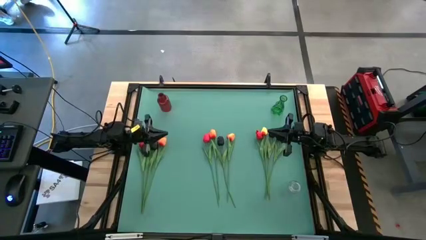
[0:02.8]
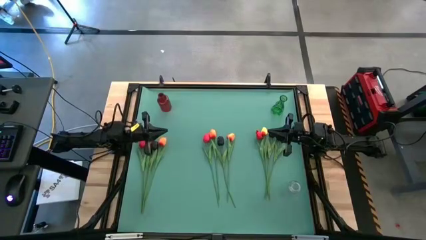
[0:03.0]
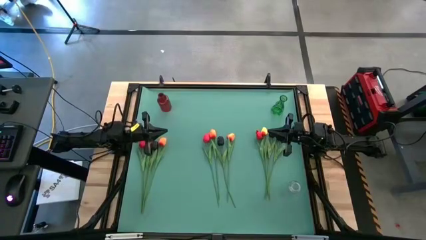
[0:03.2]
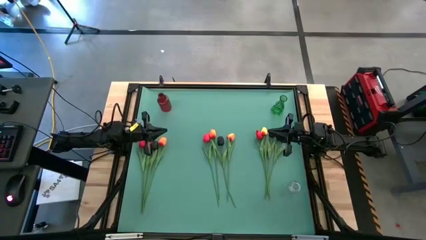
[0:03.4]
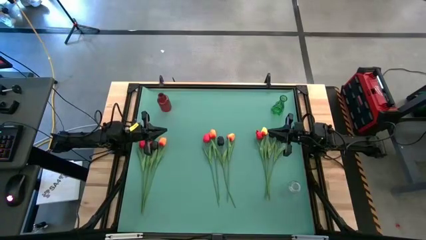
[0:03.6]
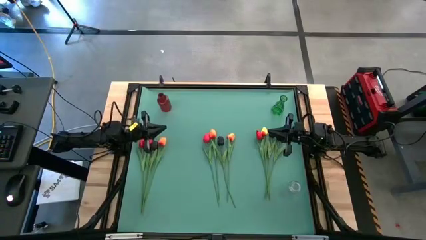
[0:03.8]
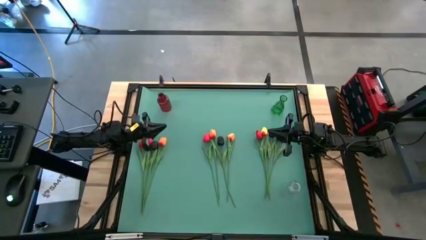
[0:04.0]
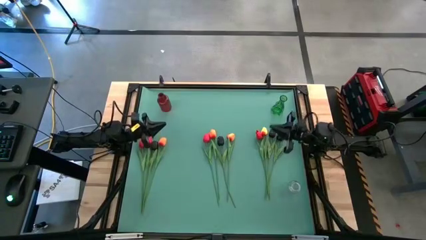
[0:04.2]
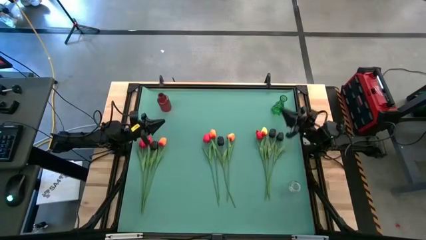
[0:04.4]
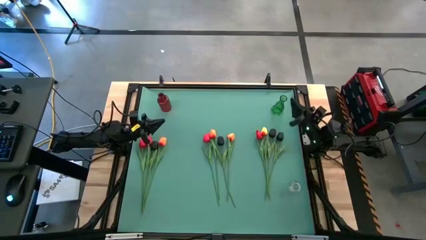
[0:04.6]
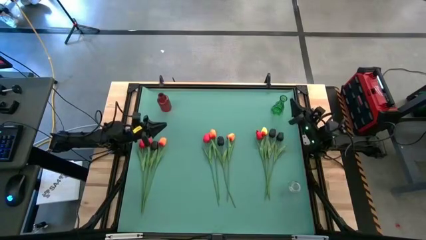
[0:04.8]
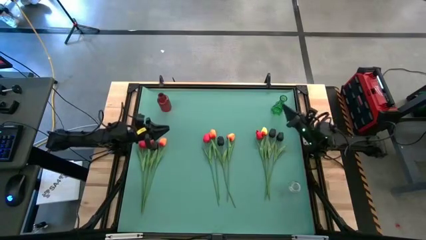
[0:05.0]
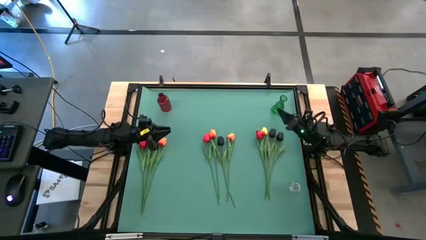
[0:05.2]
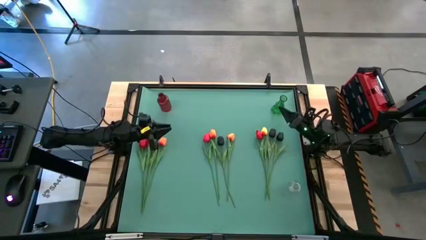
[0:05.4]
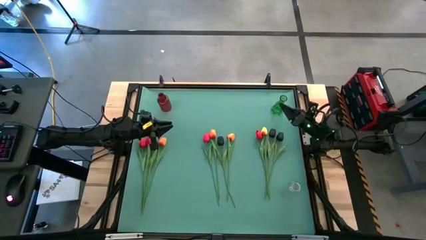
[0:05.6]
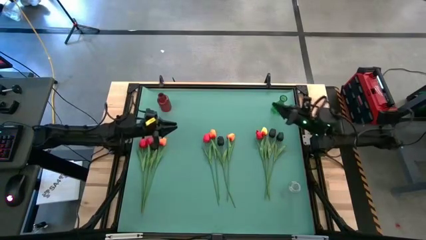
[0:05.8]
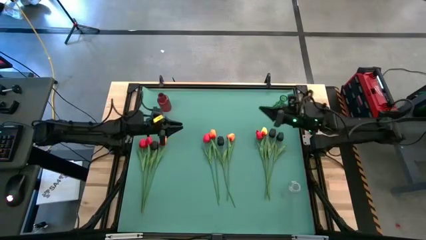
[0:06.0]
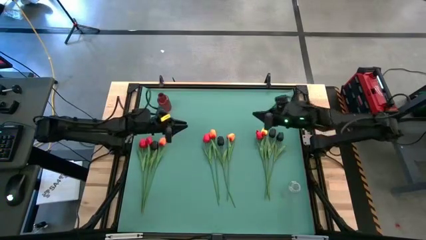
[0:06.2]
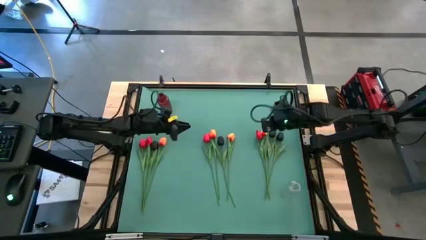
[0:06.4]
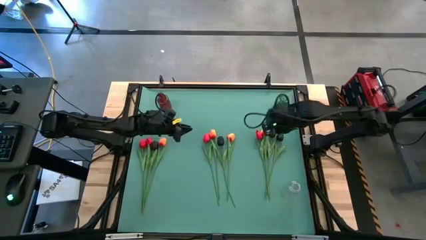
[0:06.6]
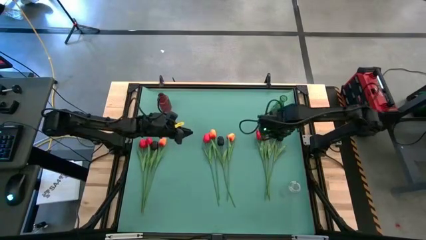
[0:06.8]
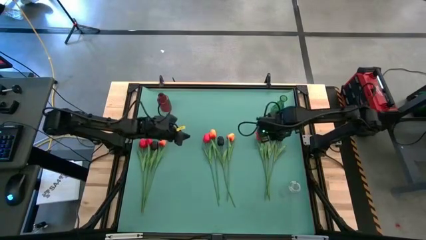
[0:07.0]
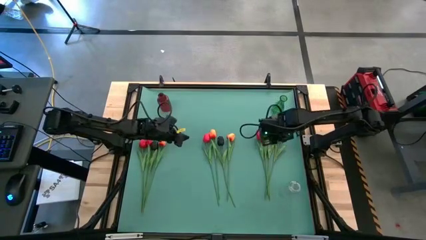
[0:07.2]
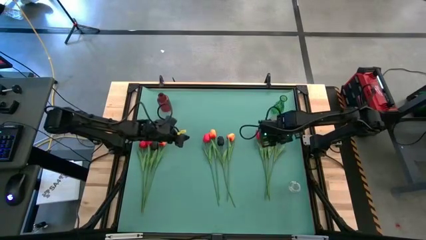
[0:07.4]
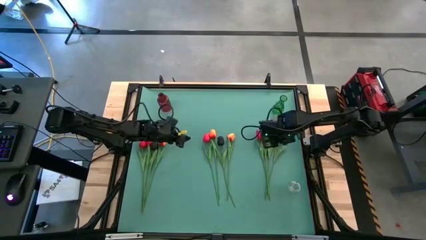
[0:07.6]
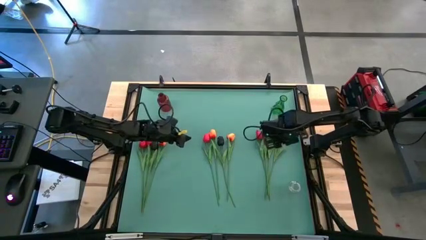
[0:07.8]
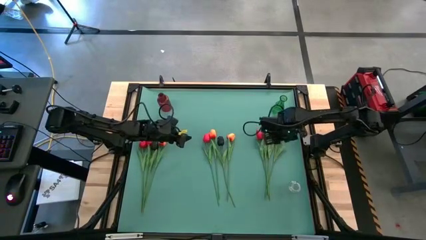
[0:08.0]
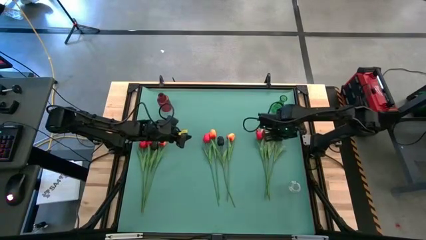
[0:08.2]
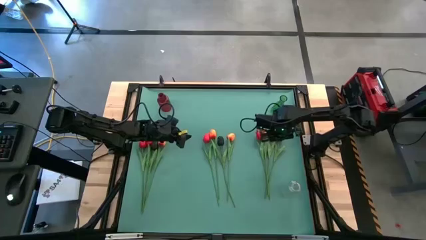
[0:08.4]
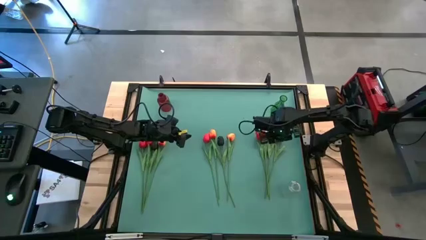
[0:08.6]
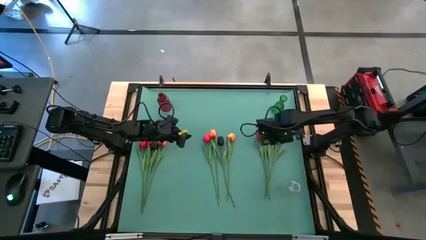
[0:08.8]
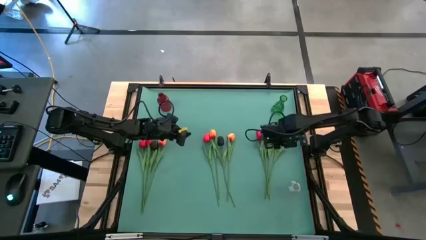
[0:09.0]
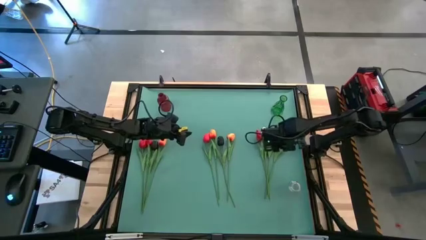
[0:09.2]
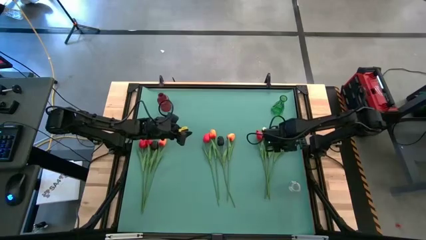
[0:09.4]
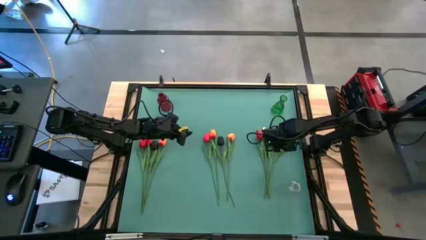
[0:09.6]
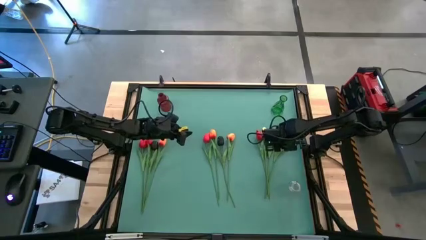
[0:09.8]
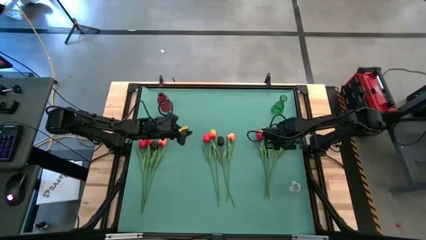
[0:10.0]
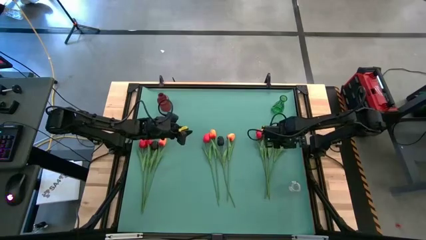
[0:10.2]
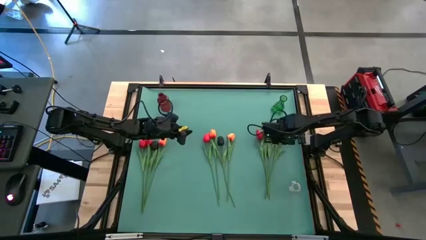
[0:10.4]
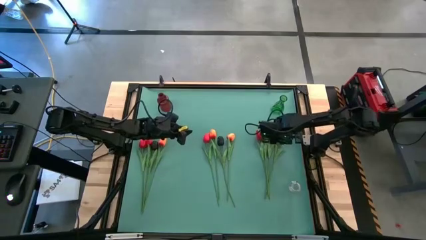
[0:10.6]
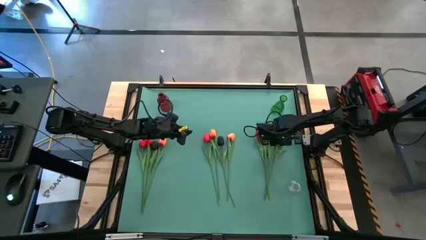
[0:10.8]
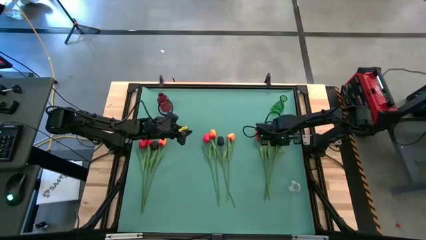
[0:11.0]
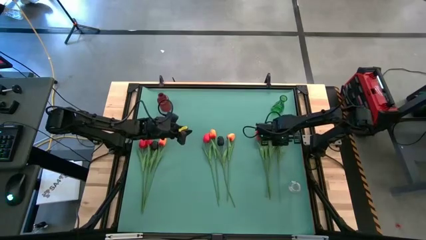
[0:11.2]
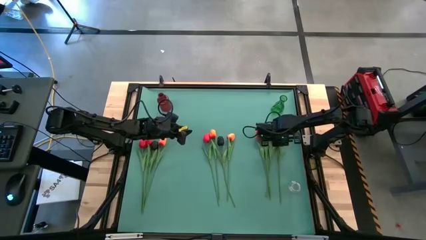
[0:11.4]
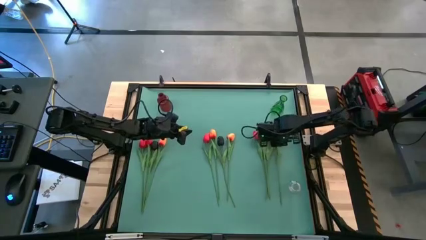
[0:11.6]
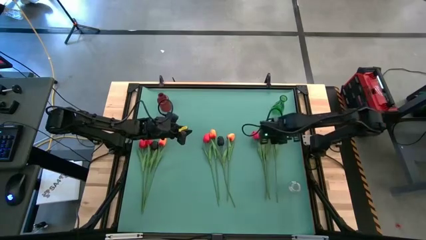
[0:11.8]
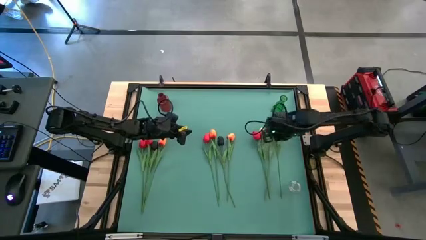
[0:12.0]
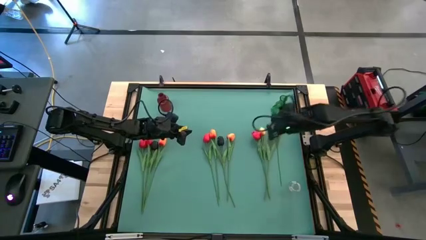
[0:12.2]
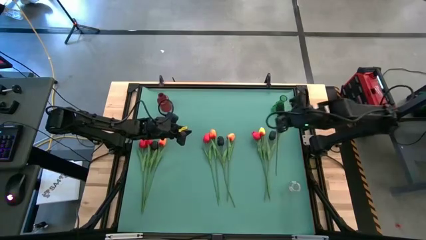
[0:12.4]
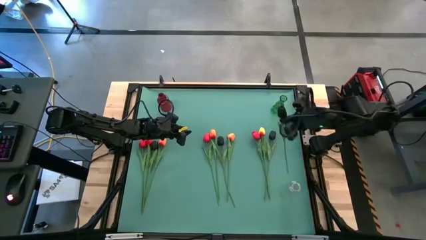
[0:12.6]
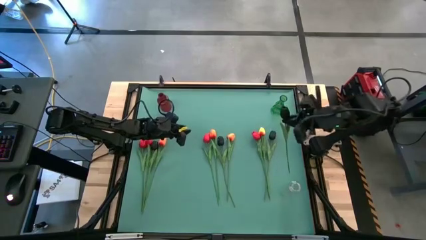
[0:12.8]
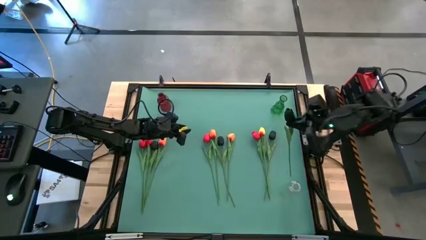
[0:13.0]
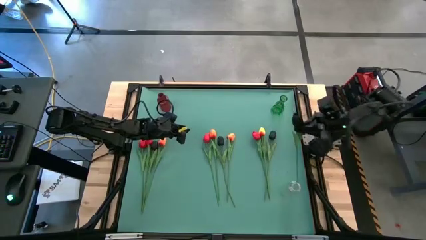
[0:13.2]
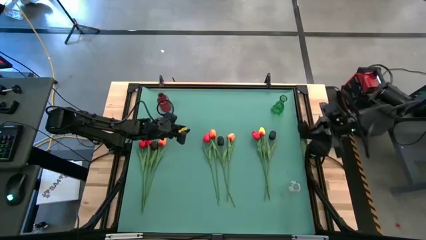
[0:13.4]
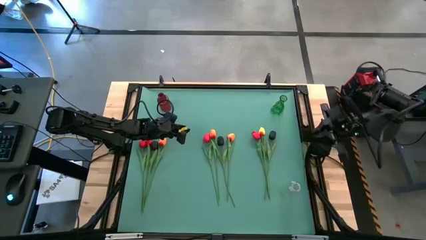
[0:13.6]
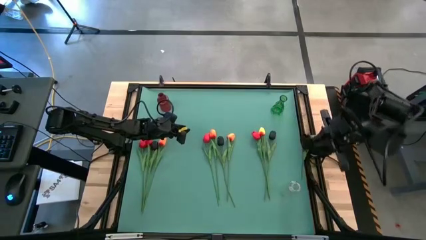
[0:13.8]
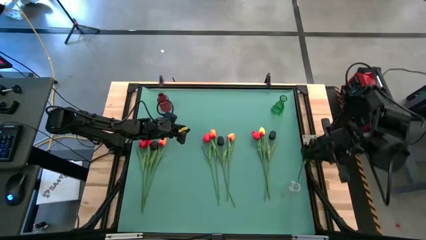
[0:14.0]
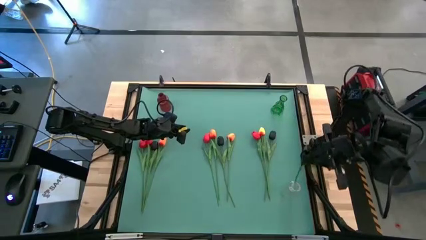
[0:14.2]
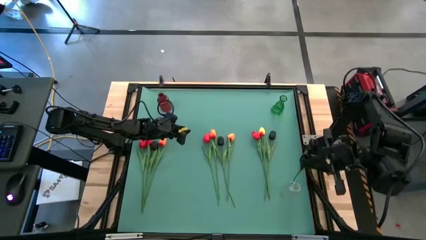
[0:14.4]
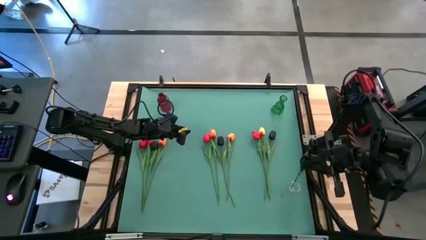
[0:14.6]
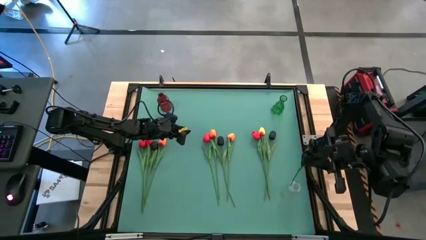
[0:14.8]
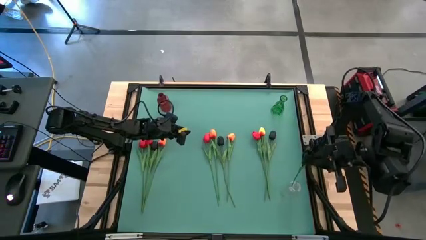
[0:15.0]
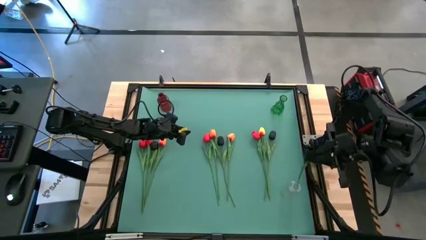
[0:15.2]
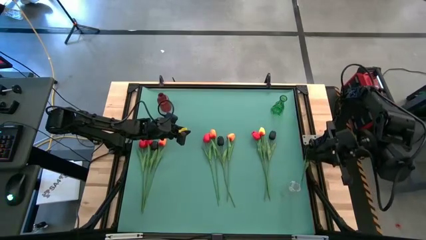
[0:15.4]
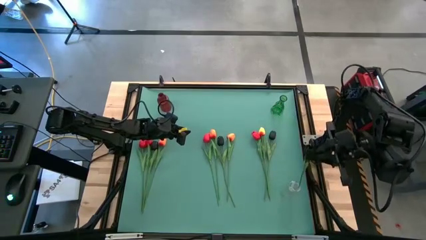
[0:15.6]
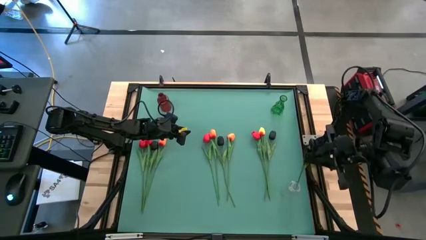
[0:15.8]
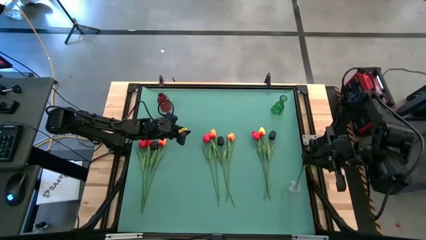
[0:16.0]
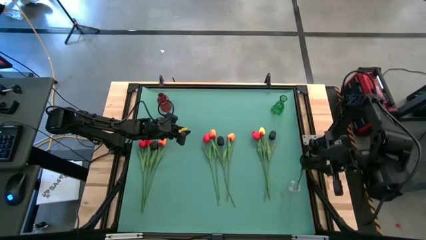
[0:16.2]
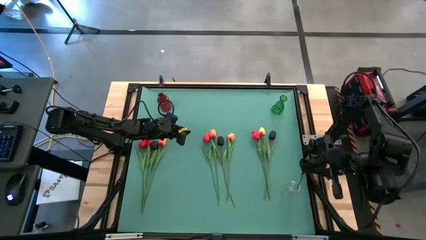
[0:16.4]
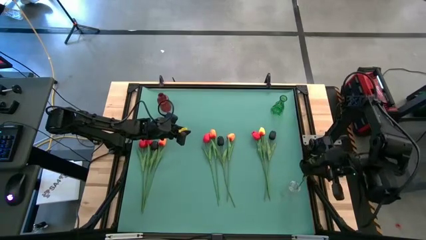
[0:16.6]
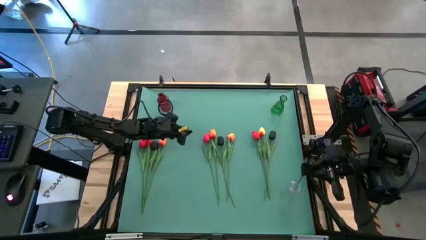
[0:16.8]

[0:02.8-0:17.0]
Task: Sort flowers into vase by color
Put the right black tulip into the transparent flower vase
